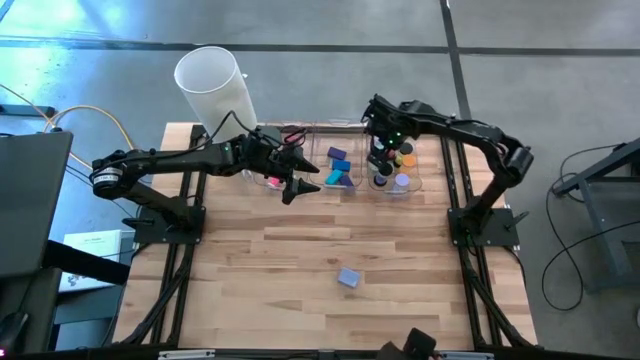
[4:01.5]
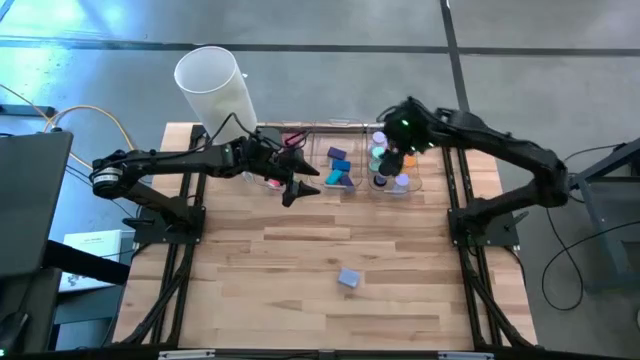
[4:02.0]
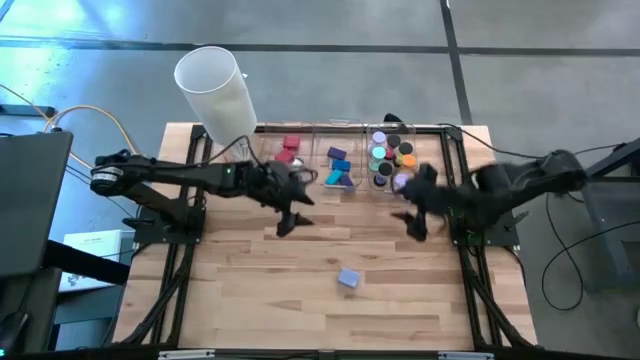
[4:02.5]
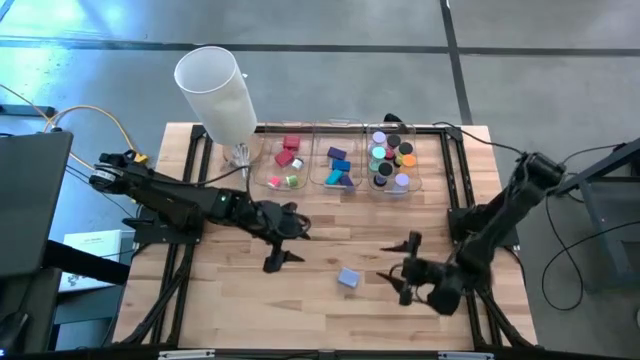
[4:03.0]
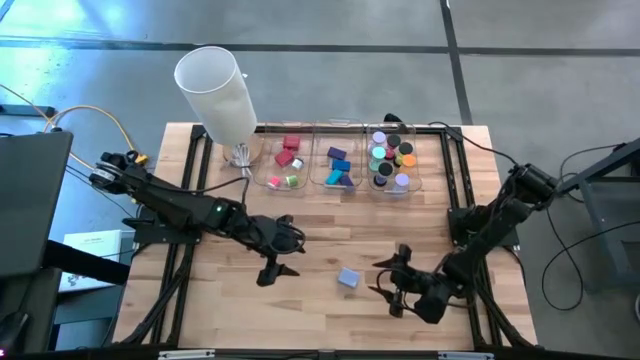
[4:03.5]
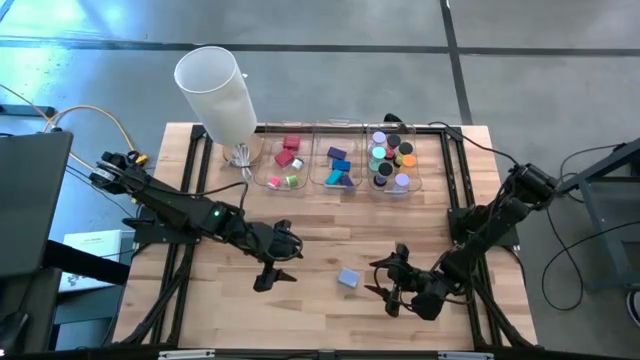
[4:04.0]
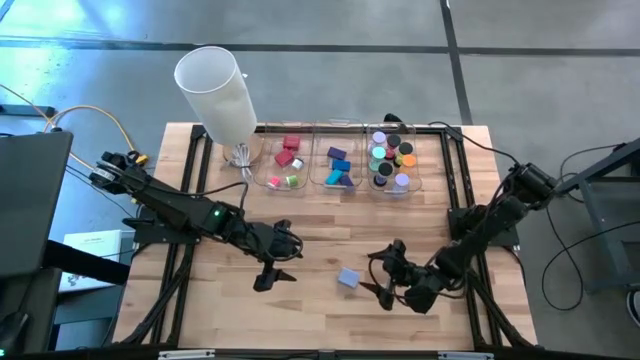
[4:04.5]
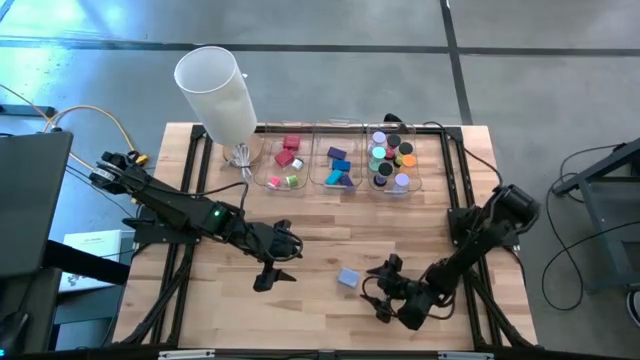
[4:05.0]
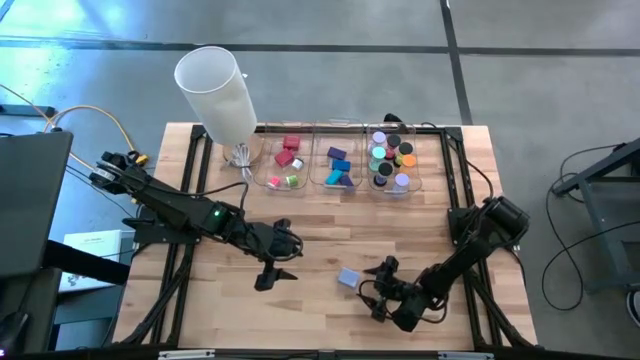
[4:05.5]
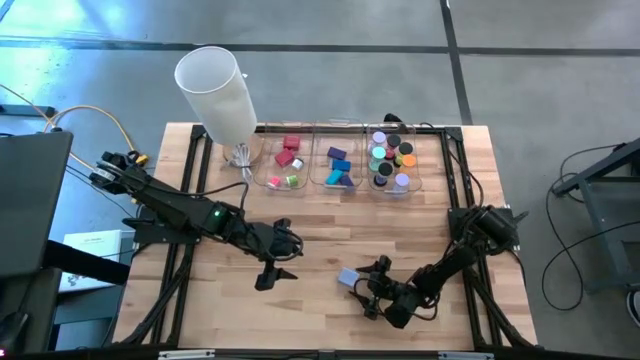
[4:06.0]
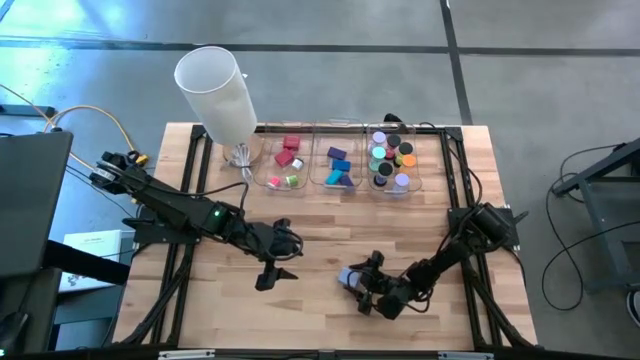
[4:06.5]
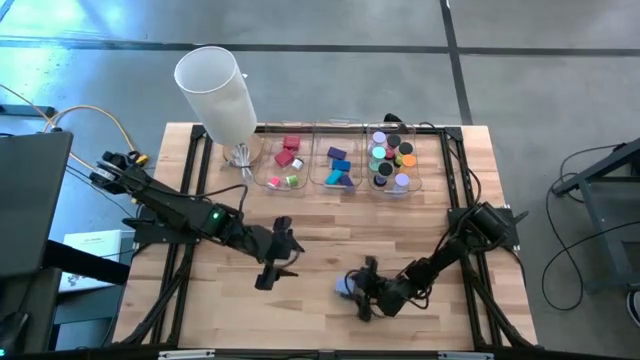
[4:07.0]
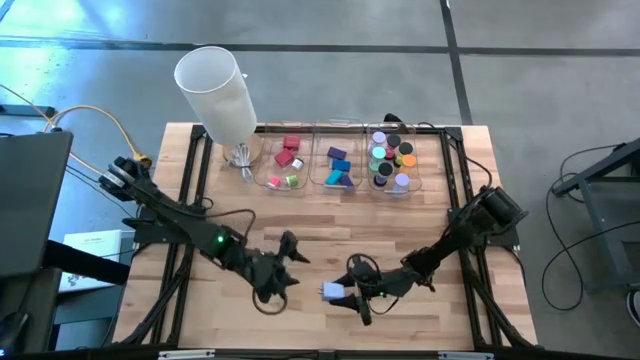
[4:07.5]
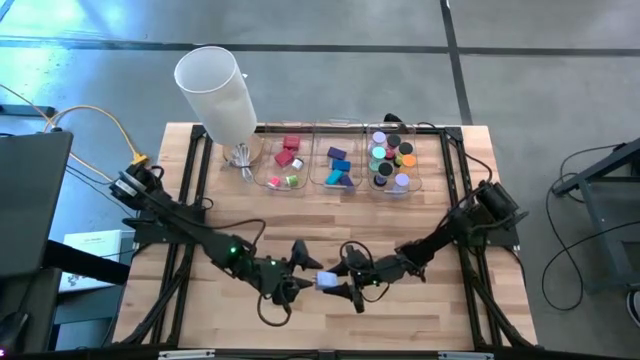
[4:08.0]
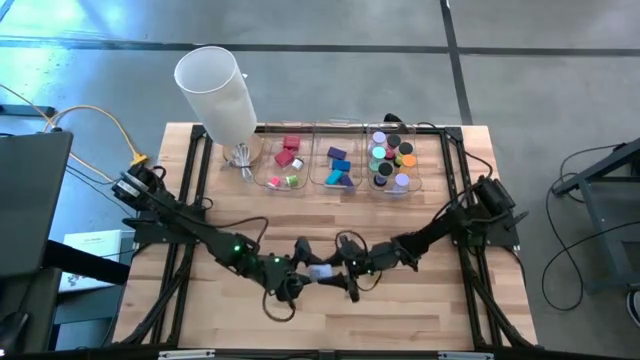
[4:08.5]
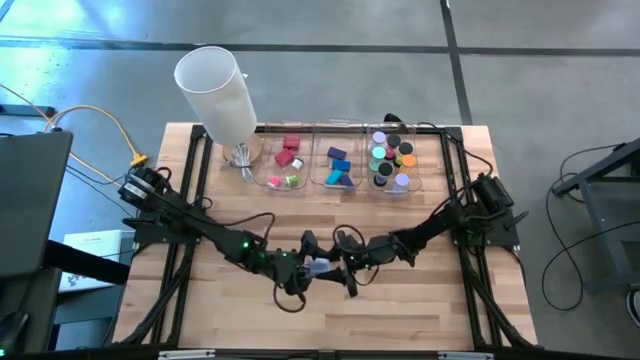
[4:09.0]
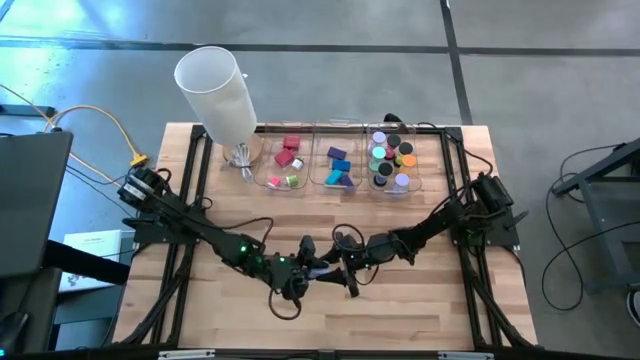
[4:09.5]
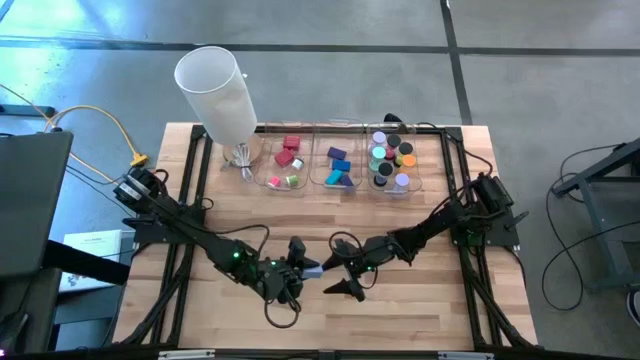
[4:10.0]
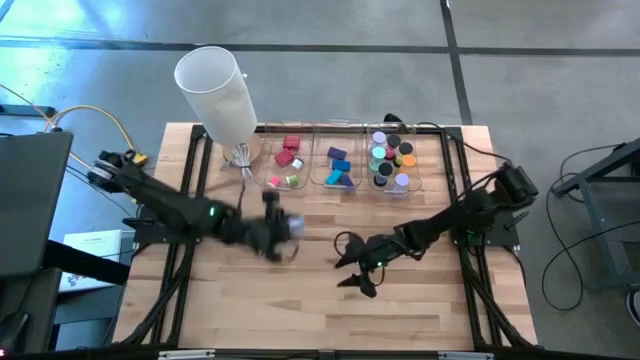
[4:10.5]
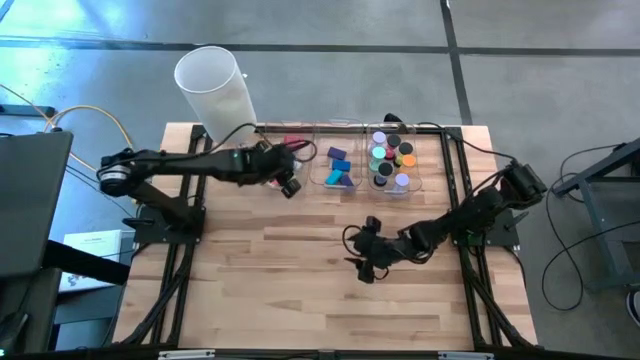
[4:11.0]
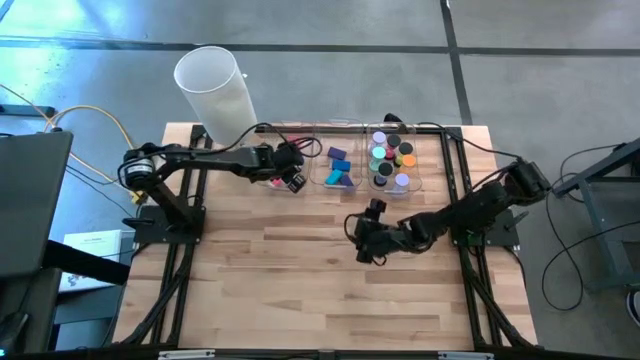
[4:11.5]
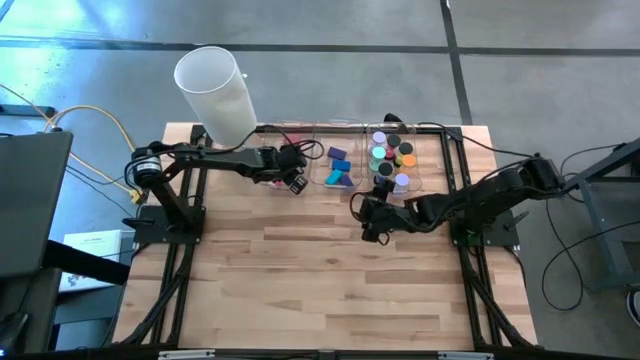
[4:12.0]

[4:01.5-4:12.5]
Task: Pick & Place Office items
Put the light blue charger adapter into the left transparent bin

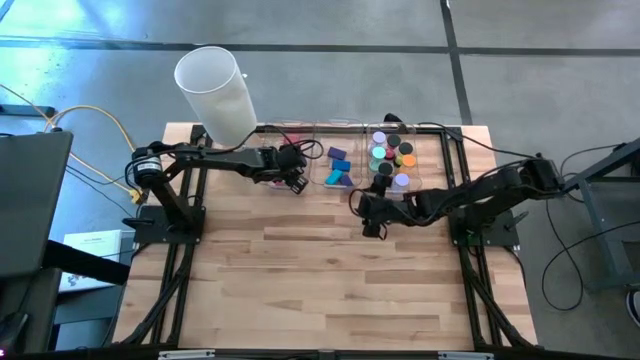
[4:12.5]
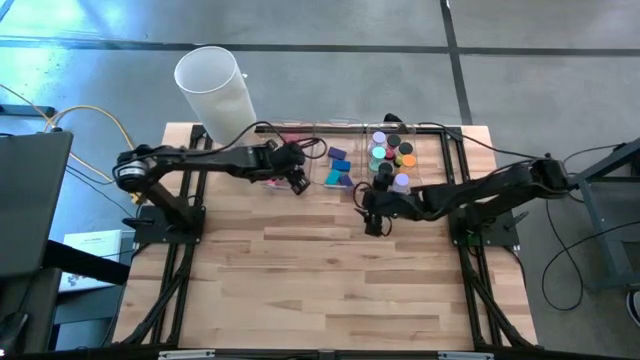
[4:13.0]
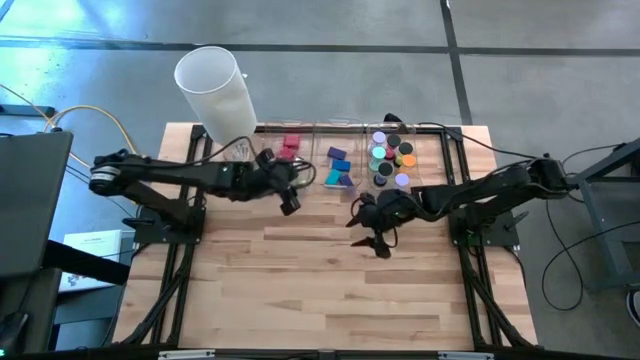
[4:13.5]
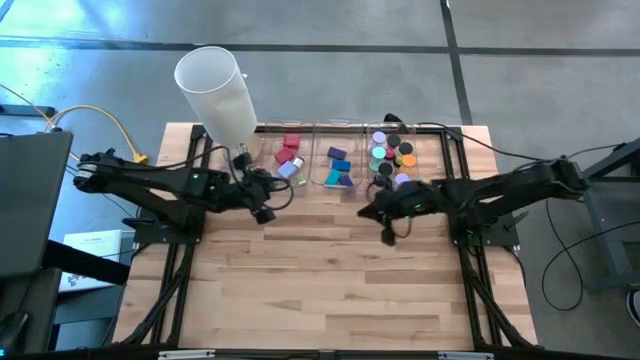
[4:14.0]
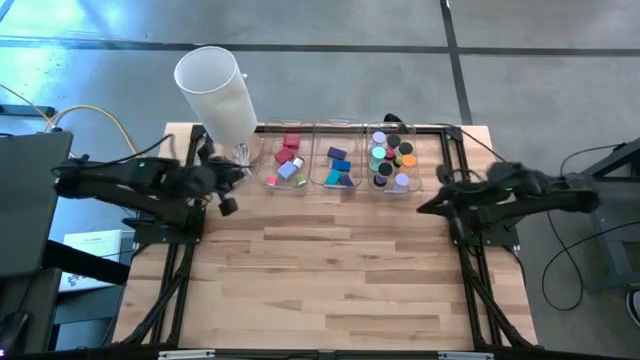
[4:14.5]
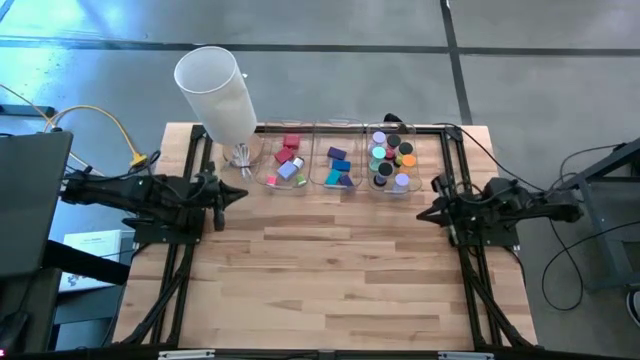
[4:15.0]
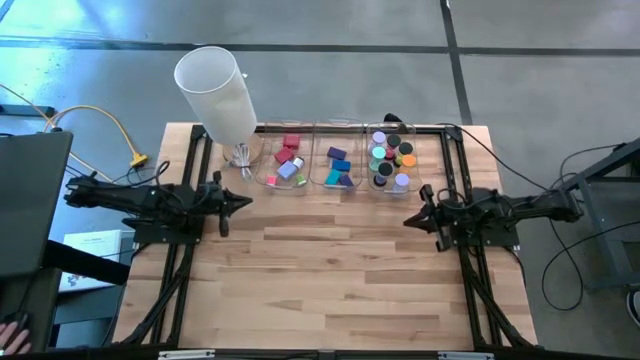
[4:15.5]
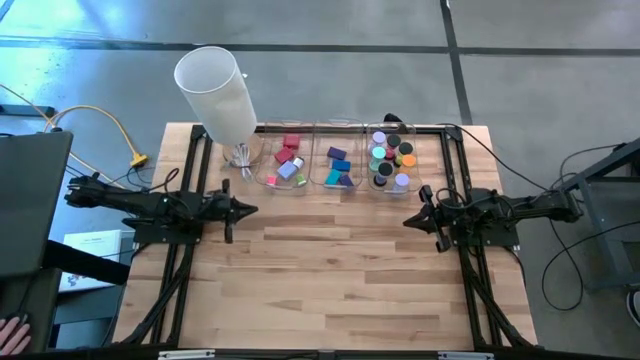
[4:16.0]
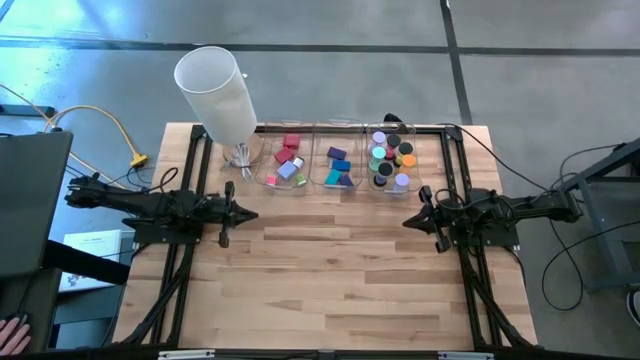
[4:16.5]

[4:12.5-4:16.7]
Return to Home Position

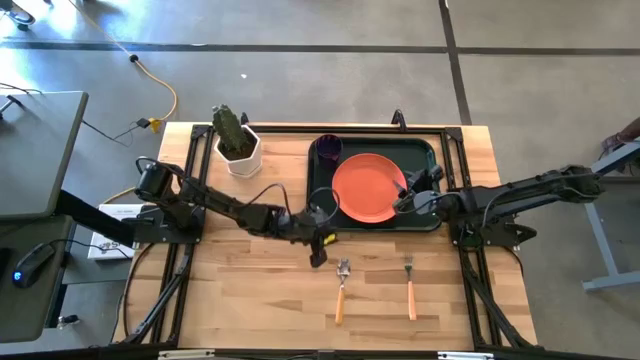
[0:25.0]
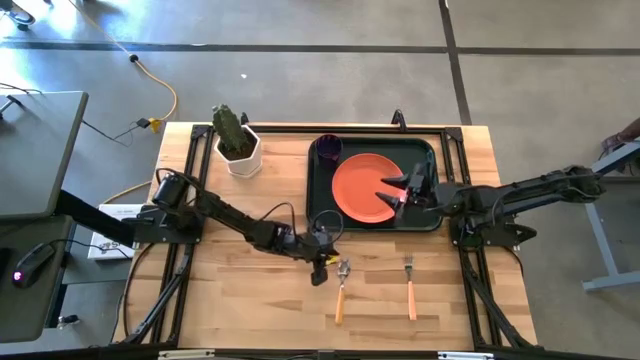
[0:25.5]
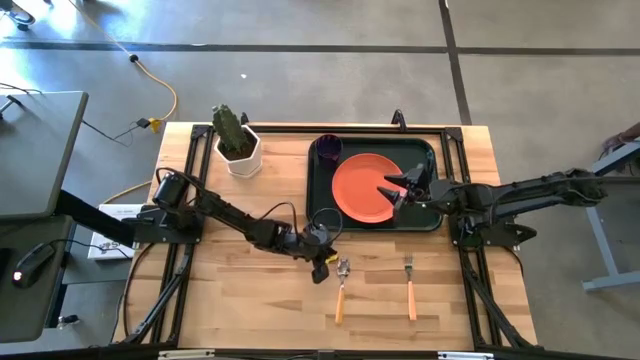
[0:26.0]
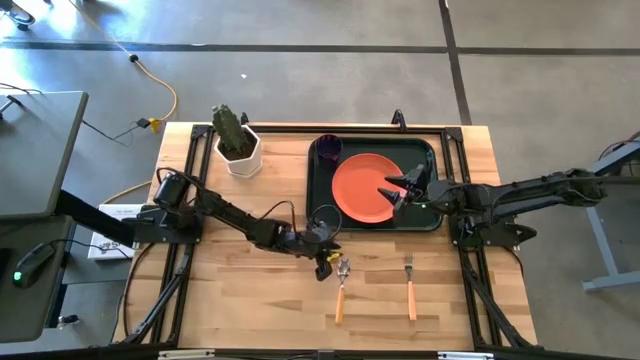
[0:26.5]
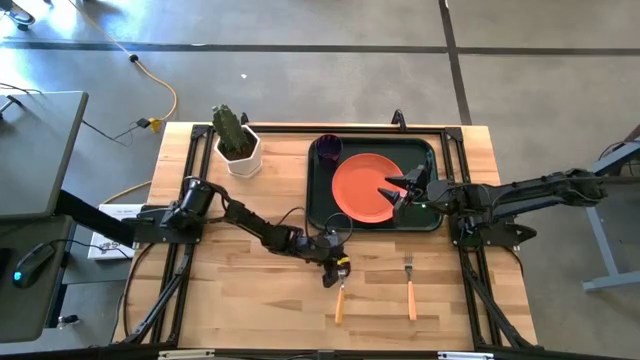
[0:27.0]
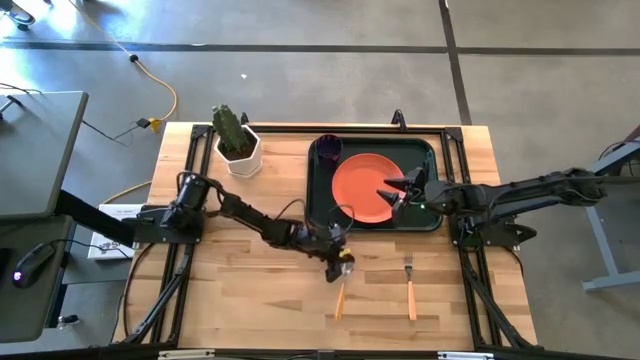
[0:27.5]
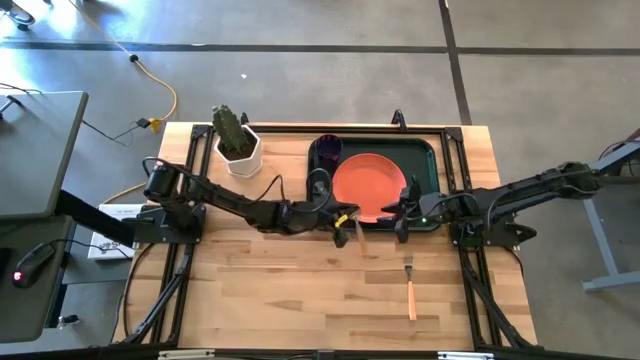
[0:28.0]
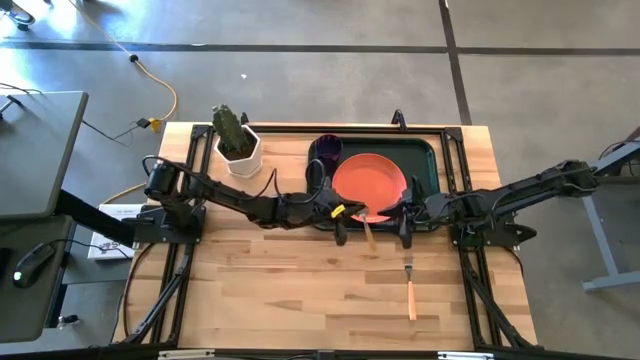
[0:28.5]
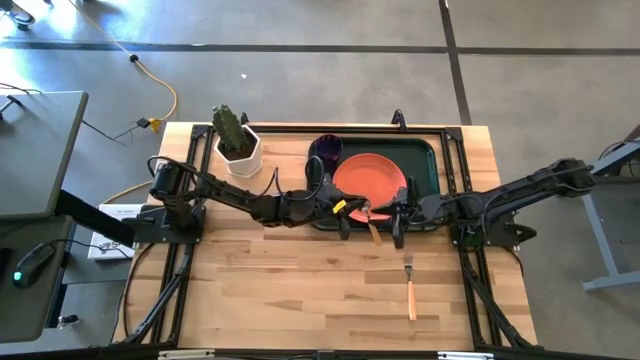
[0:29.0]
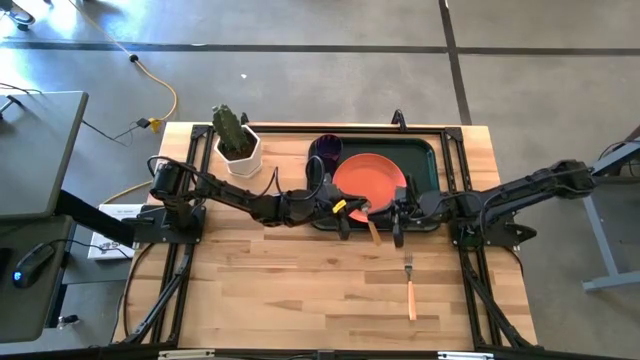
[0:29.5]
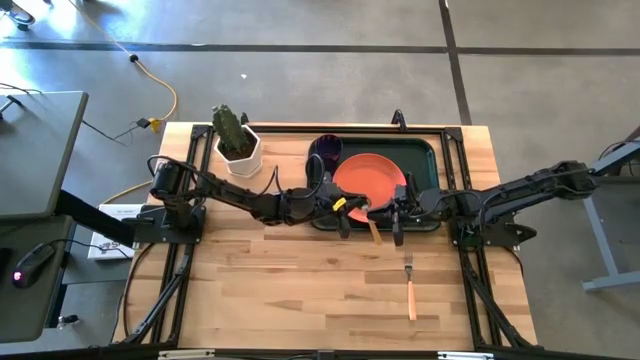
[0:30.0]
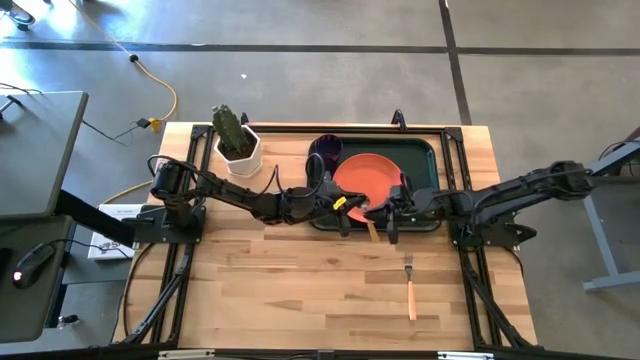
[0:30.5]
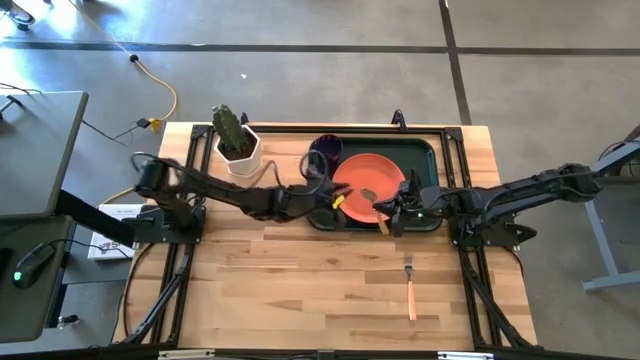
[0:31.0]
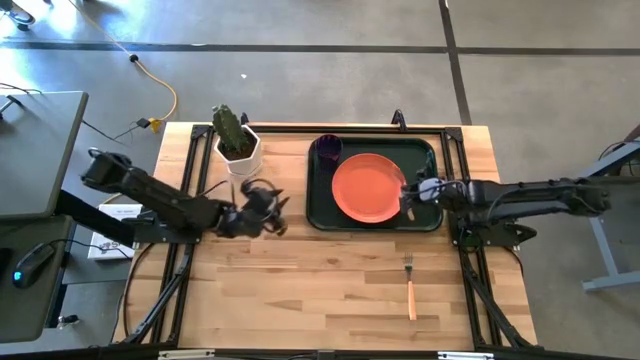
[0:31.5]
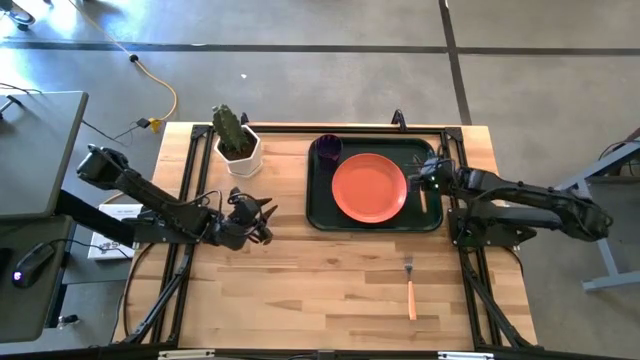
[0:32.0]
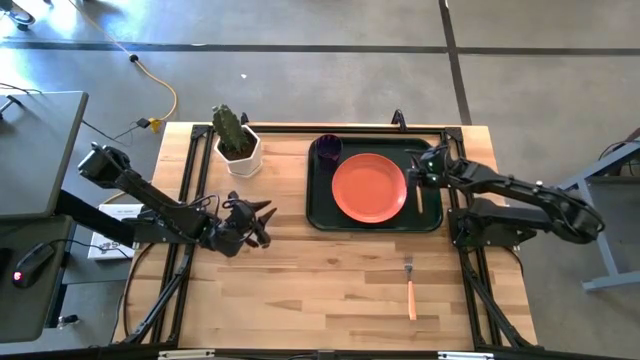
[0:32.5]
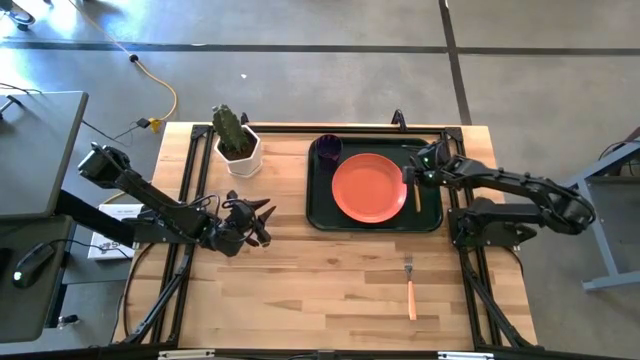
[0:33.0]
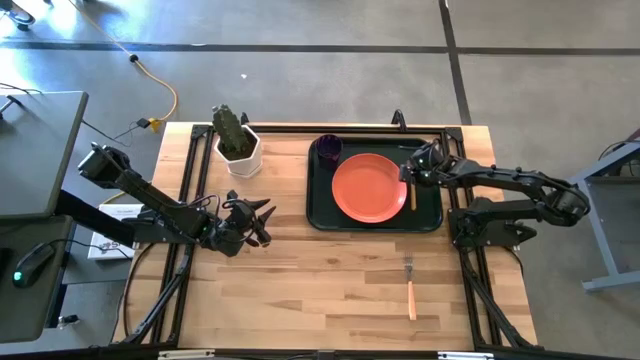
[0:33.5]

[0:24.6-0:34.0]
Task: Pick and place plate/cup/fork/spoon on tray
Put the yellow spoon on the black tray to the right of the orange plate
